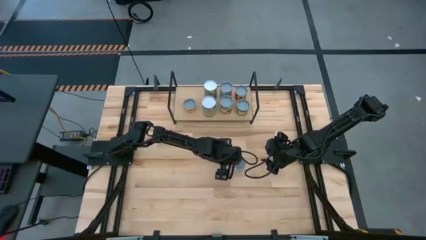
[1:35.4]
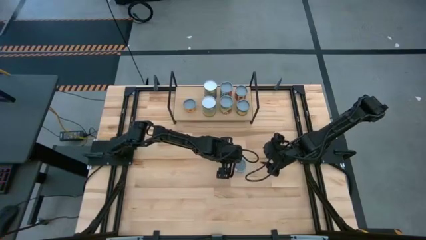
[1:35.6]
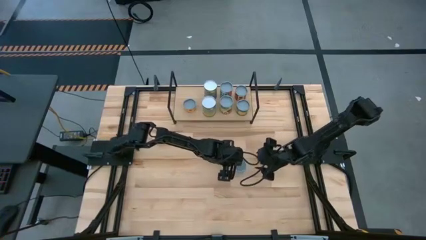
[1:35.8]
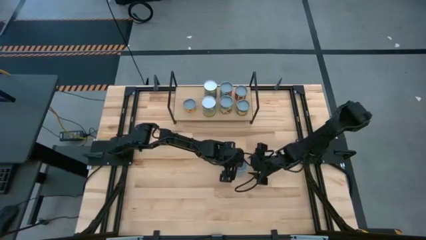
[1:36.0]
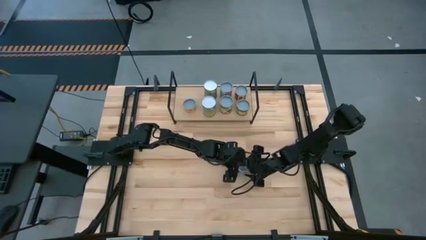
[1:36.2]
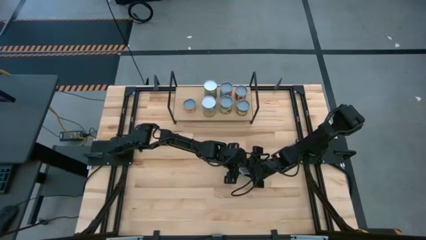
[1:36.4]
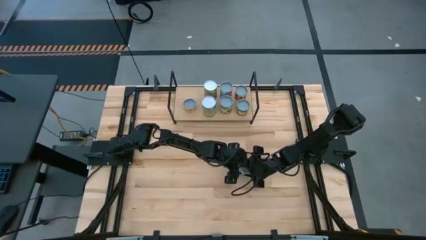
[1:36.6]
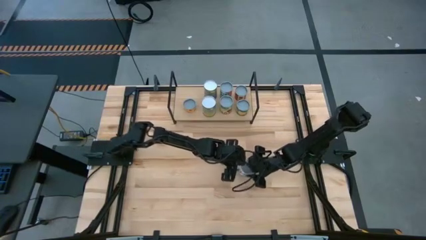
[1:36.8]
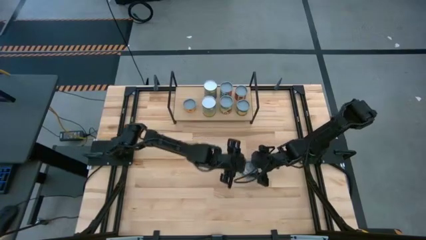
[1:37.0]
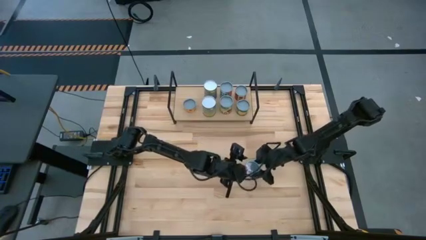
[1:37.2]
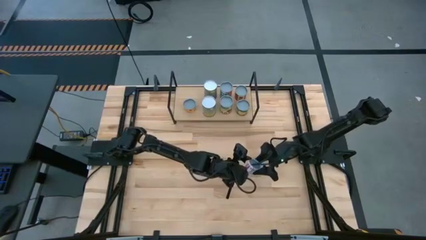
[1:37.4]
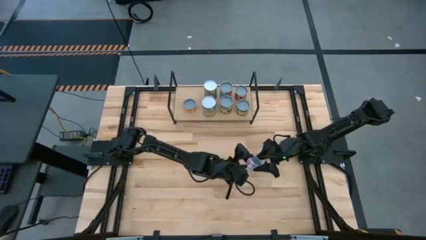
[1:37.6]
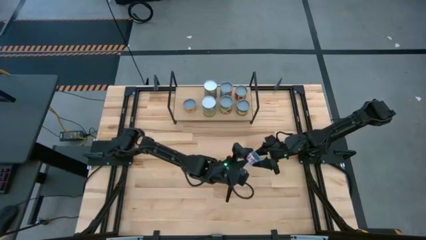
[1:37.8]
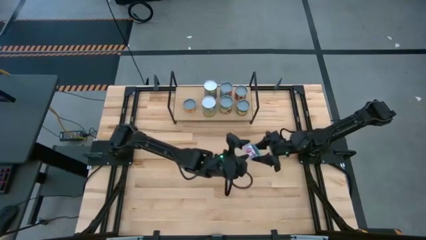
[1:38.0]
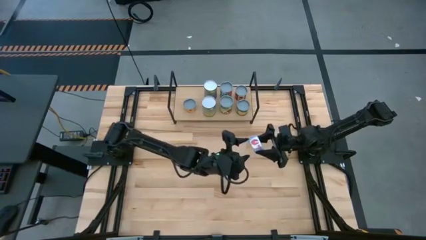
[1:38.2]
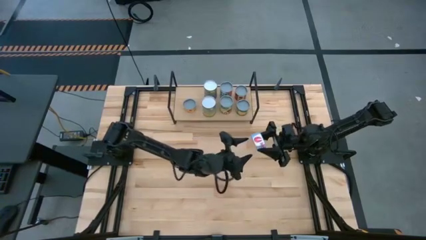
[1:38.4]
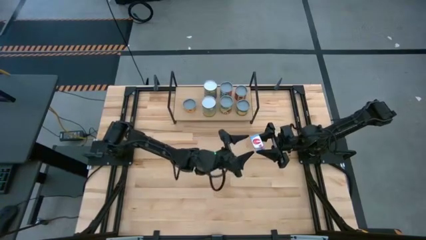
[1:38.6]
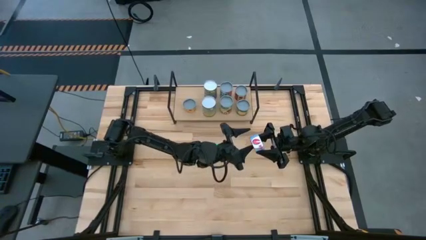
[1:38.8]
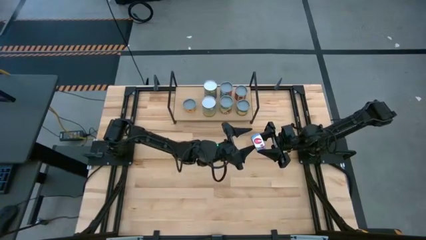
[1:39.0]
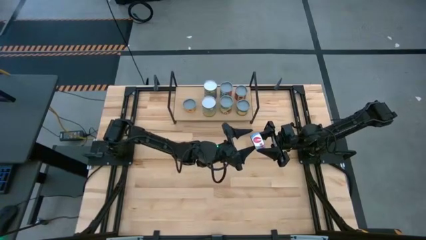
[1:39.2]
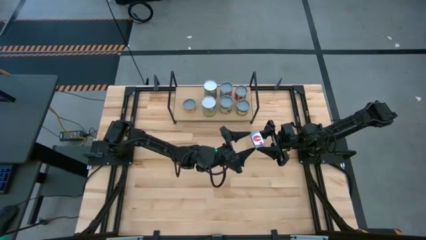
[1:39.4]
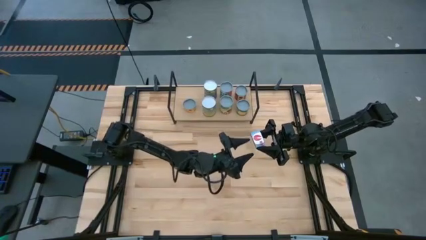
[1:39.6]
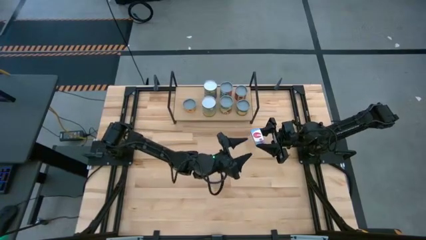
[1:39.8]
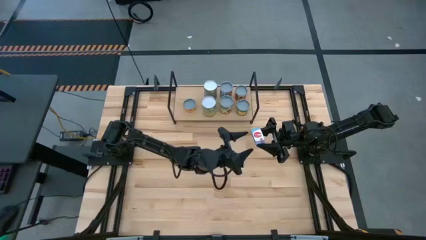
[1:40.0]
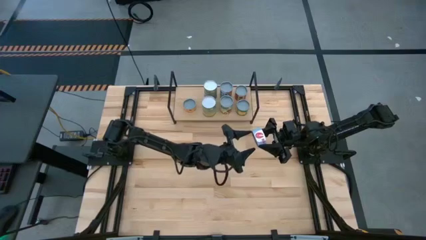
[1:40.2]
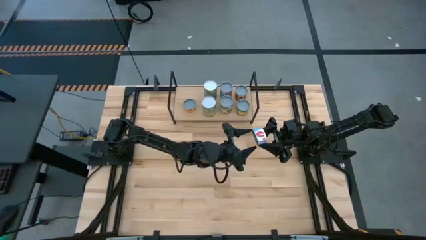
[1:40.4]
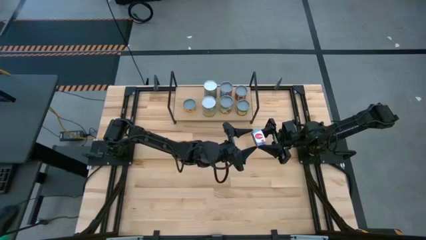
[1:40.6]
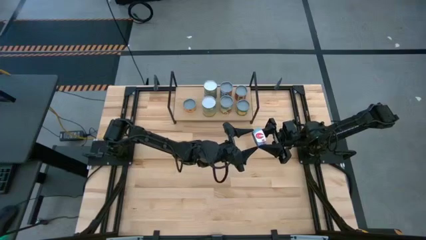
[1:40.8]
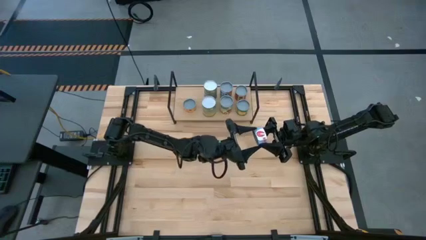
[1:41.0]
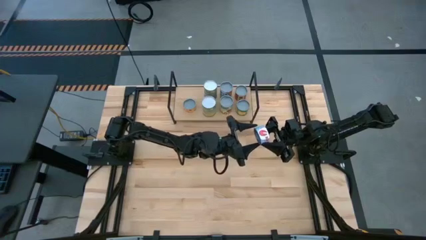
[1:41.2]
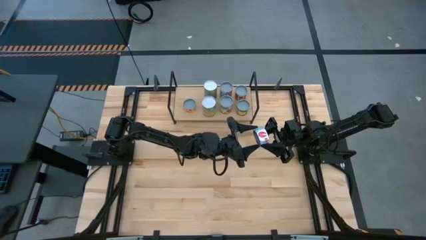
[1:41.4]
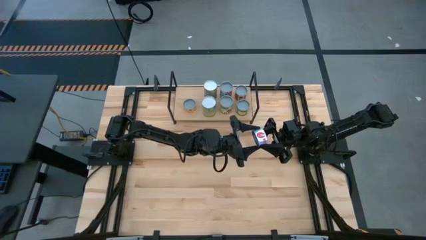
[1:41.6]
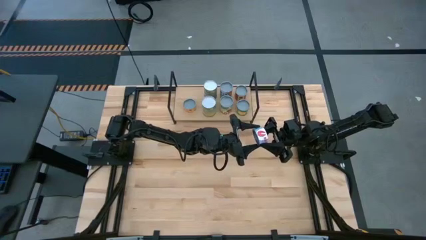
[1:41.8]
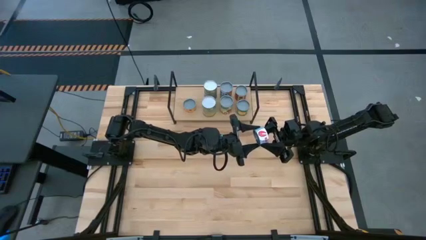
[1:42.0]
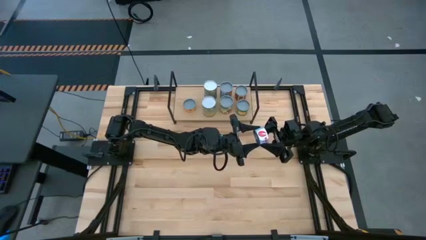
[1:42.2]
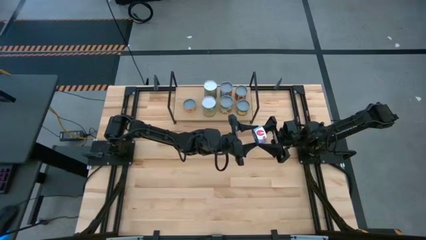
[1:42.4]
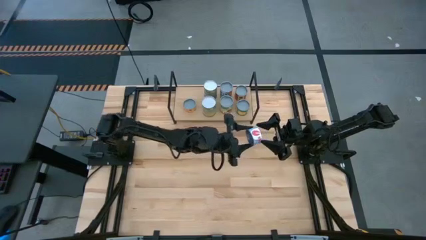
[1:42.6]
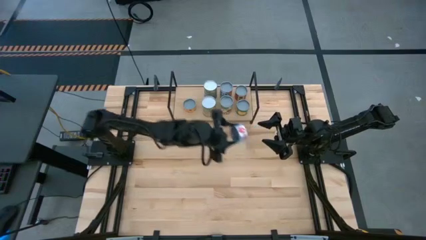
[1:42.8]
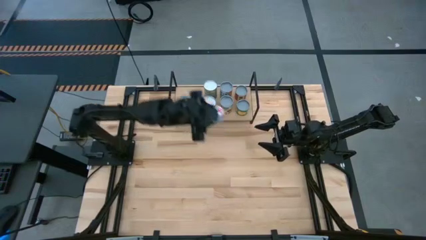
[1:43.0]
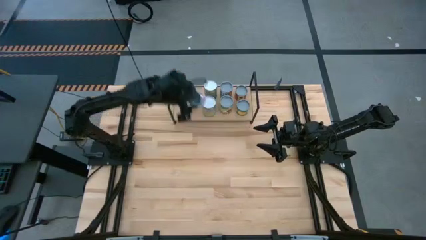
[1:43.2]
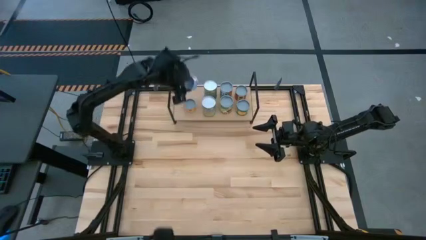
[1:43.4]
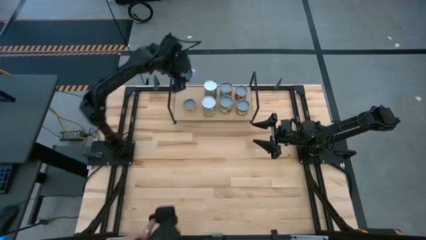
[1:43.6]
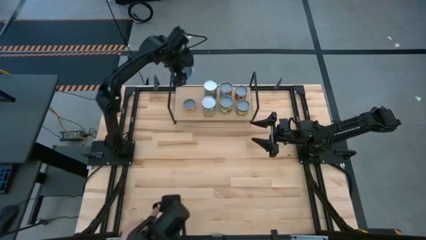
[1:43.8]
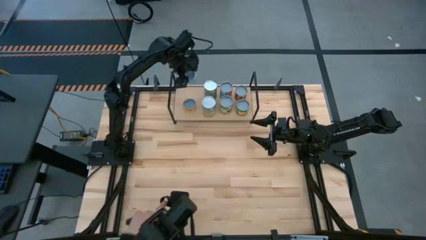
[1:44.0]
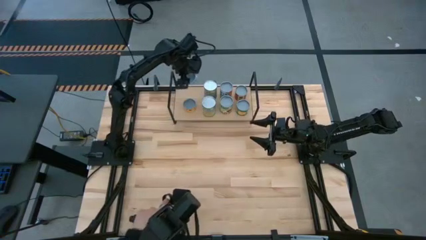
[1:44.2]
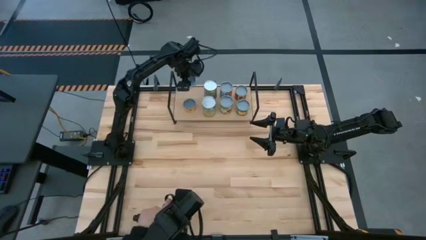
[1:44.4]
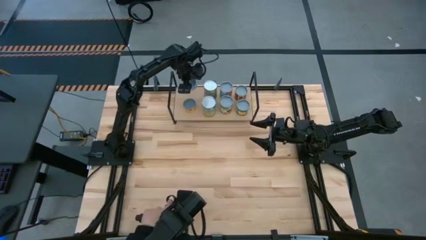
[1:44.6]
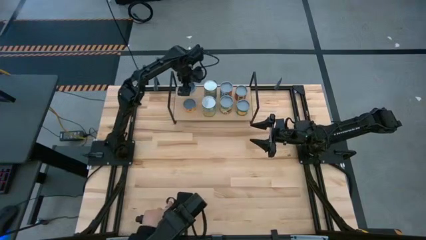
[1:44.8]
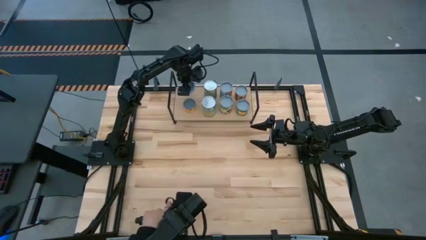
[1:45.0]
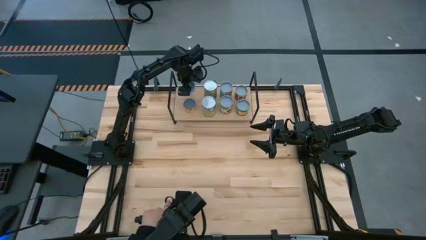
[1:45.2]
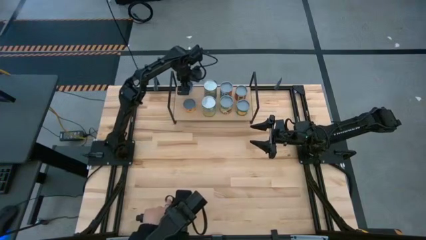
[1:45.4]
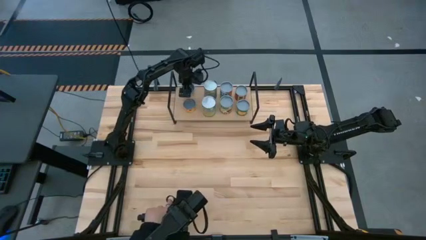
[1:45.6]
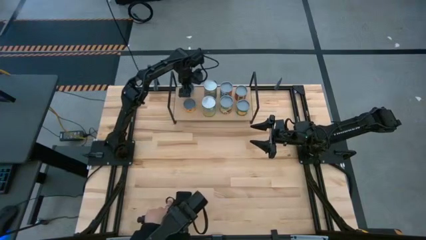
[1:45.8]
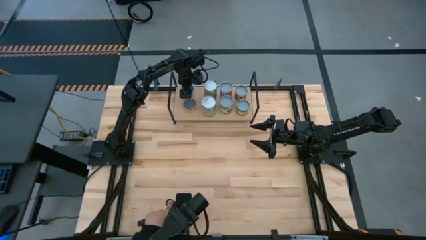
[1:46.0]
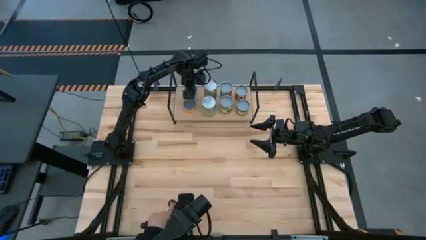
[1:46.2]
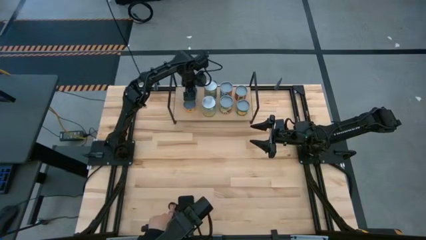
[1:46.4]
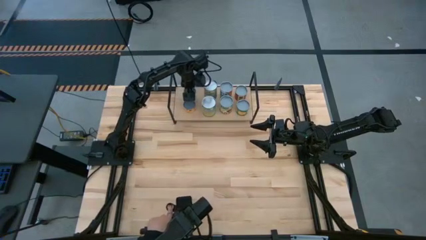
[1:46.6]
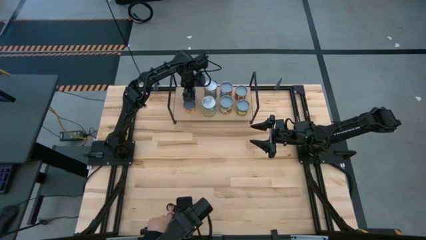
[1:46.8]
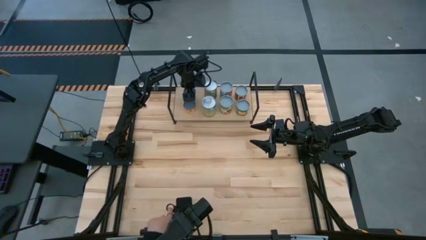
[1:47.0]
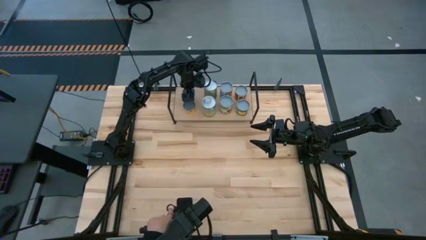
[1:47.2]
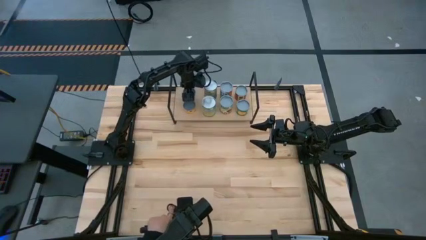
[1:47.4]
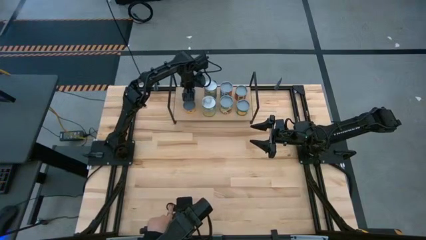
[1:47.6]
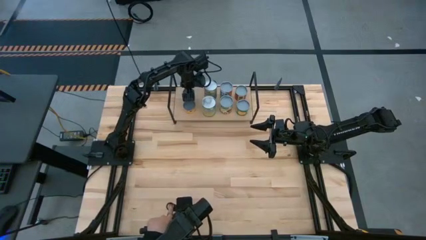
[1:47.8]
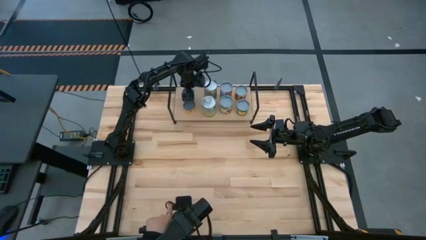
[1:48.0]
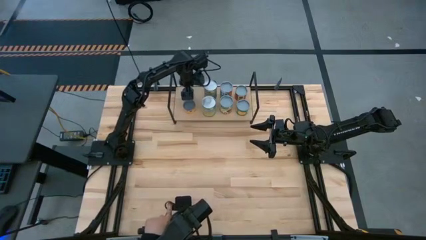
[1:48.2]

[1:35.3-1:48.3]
Task: Pick and place cans onto a shelf
Put the canned salmon on the shelf

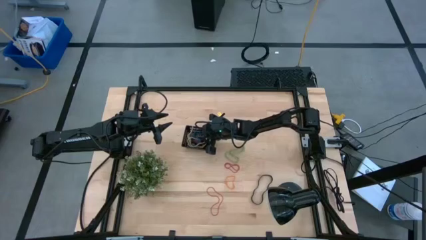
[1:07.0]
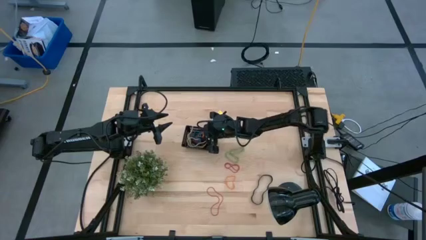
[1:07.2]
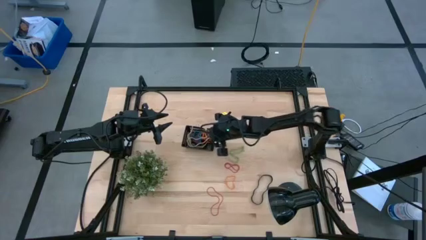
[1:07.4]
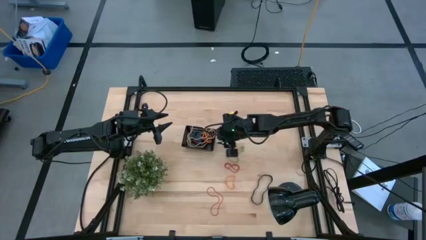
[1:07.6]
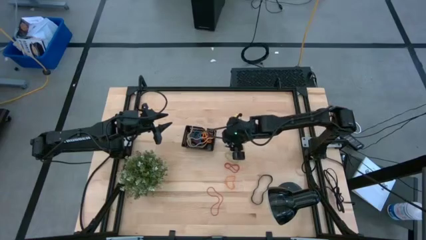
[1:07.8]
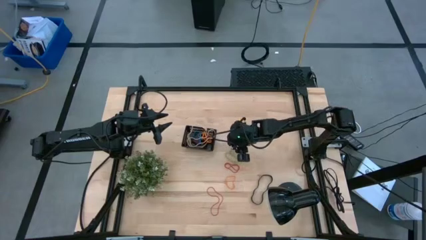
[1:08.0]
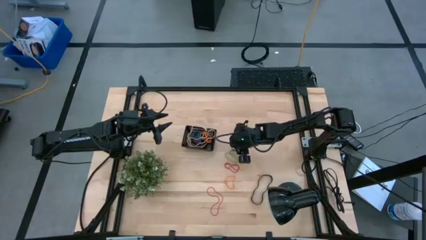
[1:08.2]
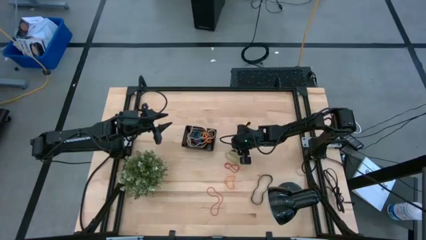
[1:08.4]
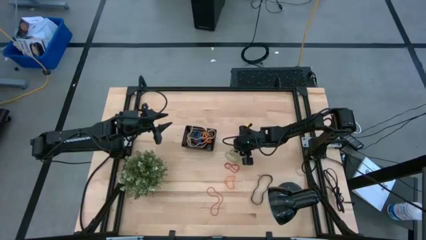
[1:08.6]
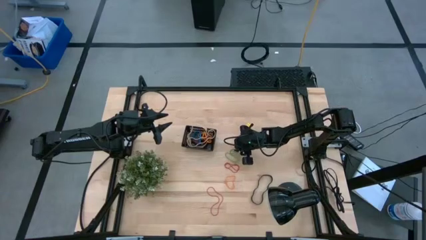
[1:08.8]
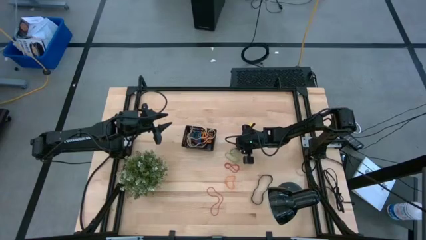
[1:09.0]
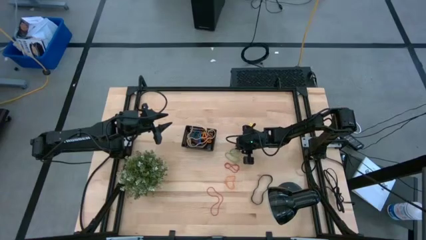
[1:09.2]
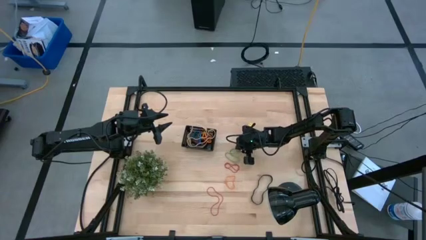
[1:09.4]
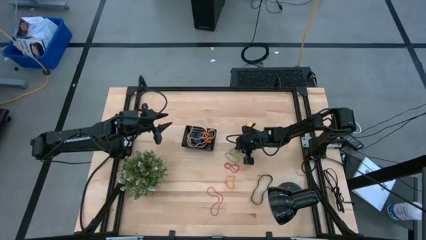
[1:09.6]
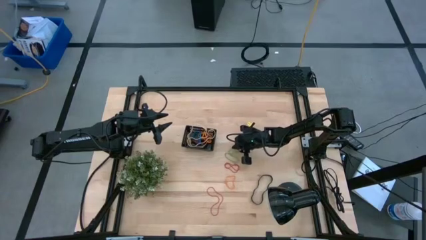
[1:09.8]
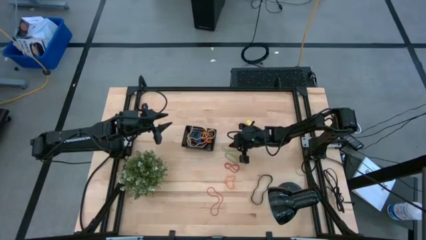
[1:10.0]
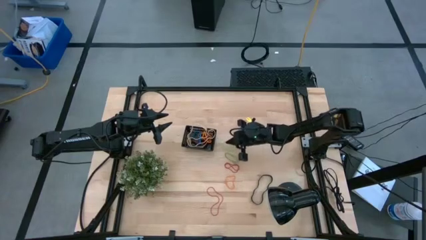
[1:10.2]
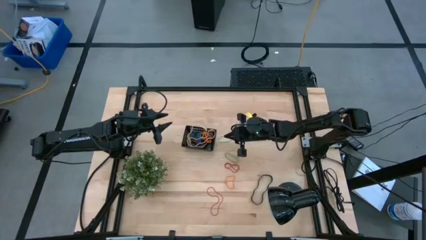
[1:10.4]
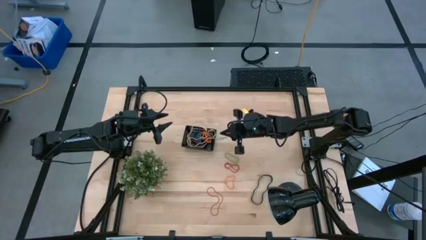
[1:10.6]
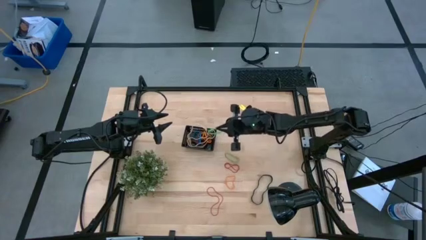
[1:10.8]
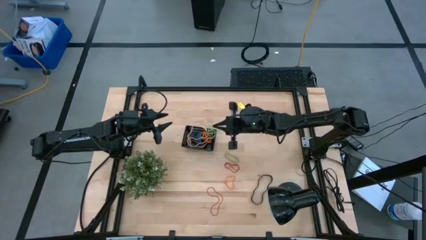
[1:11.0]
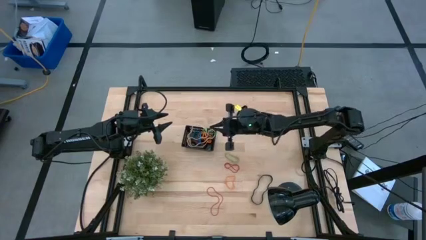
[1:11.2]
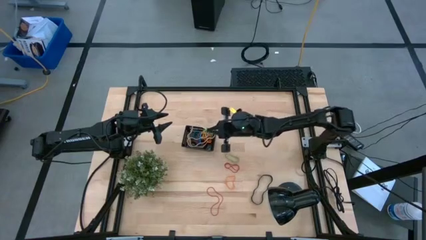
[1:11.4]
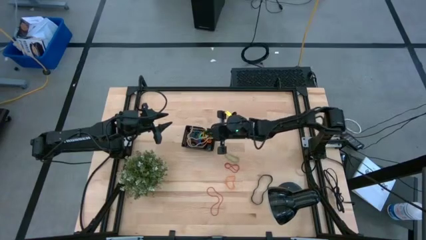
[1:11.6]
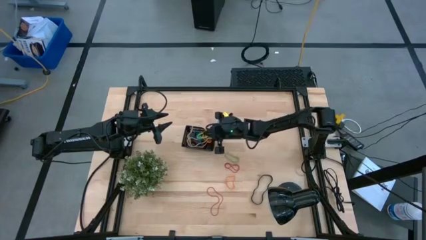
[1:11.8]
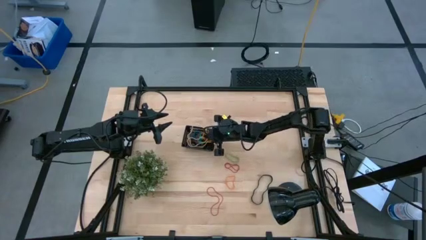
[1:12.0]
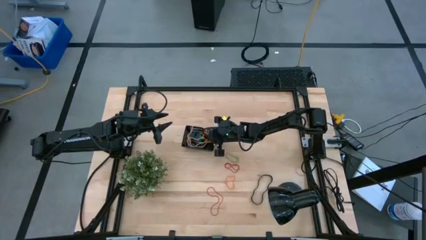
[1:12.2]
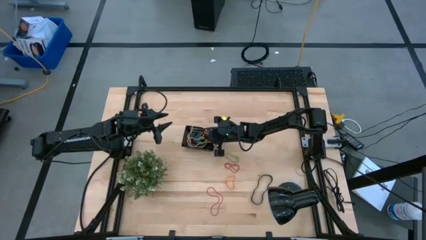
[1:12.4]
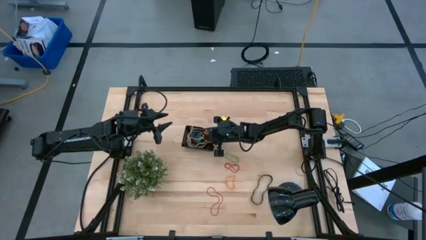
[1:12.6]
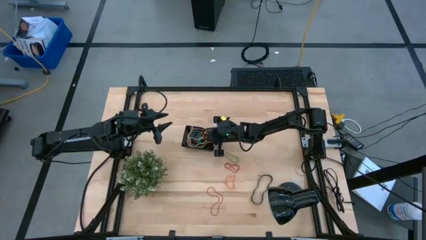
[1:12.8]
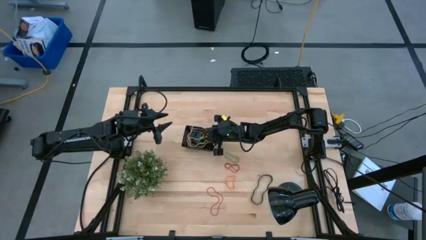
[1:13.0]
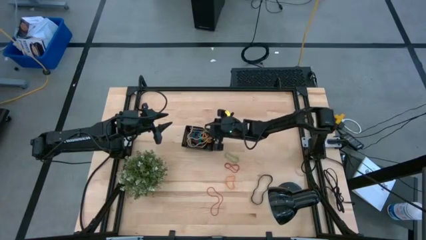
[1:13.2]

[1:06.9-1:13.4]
Task: Pick and place rubber bands into bin
Put the top green rubber band into the black bin
